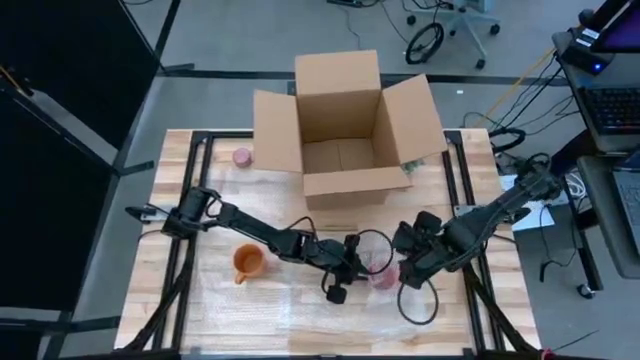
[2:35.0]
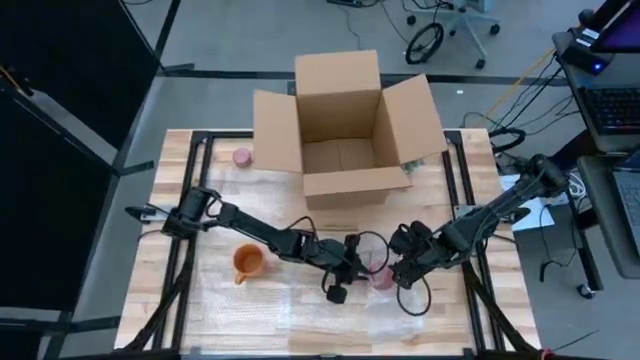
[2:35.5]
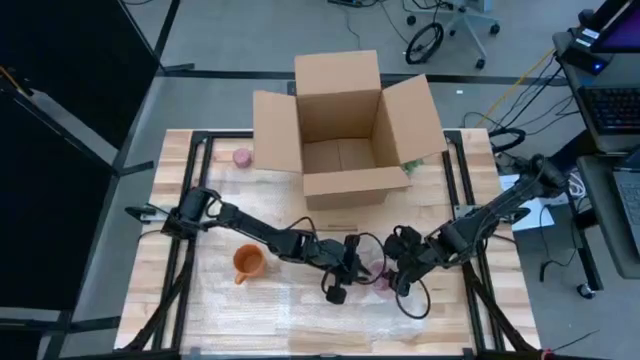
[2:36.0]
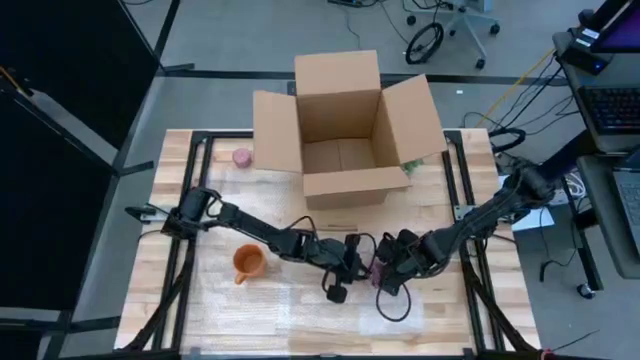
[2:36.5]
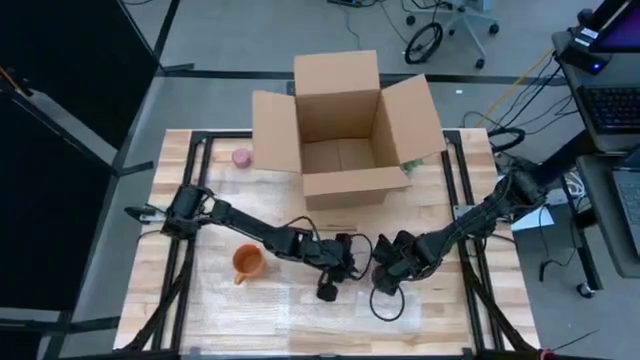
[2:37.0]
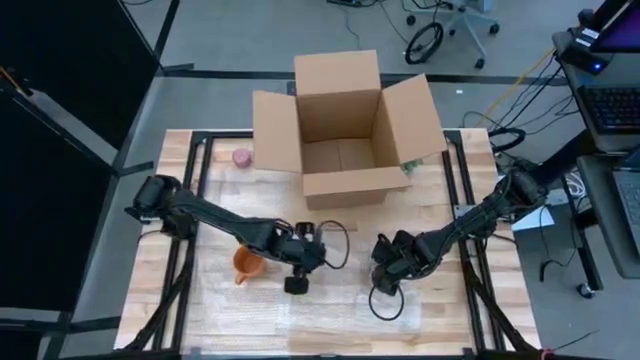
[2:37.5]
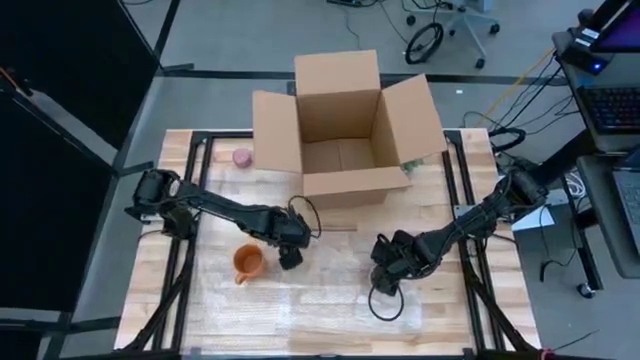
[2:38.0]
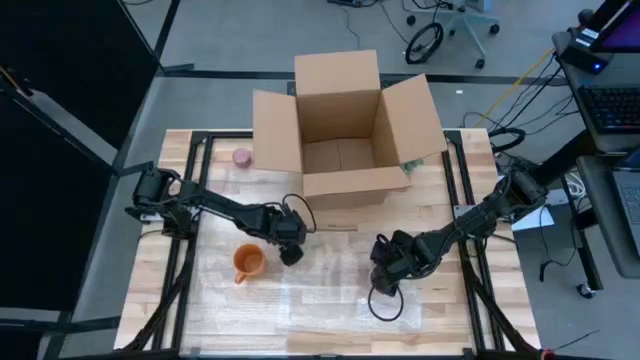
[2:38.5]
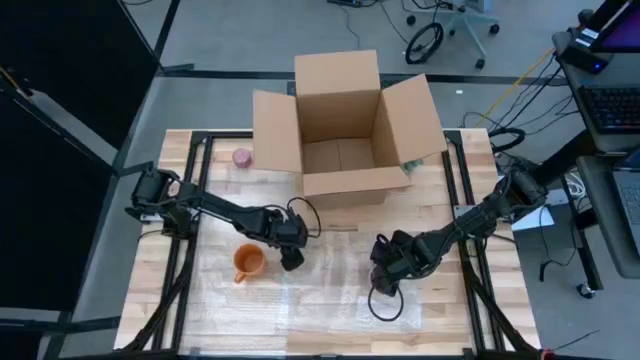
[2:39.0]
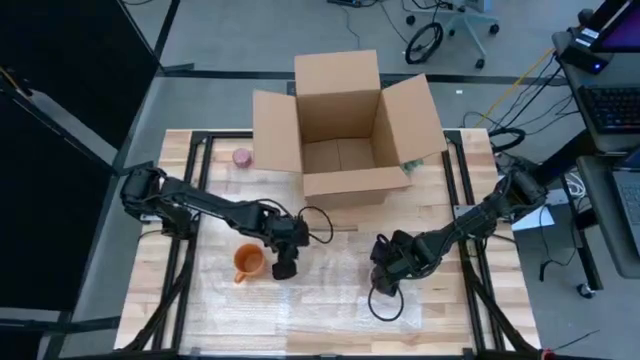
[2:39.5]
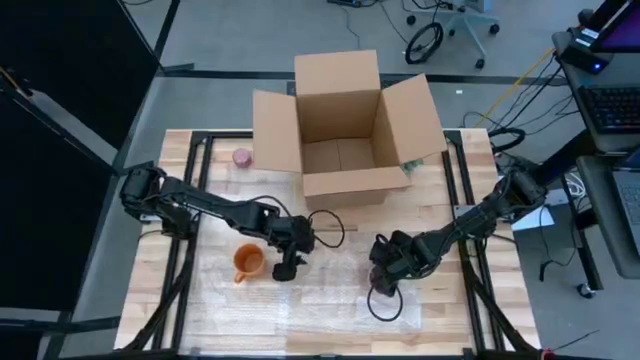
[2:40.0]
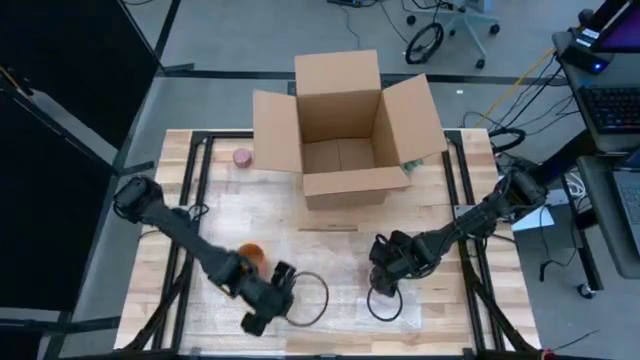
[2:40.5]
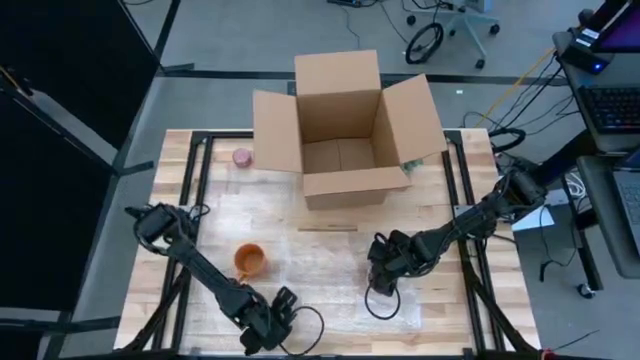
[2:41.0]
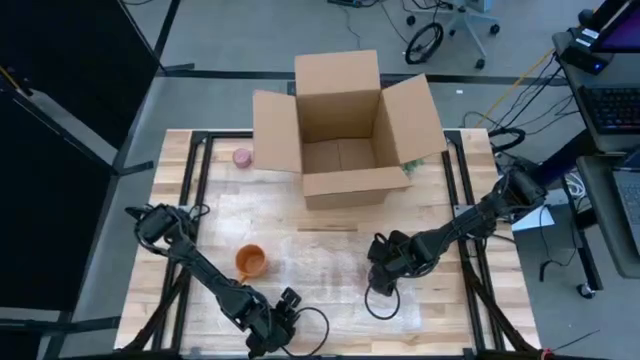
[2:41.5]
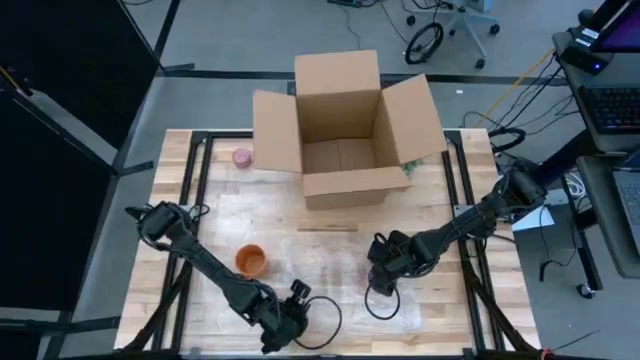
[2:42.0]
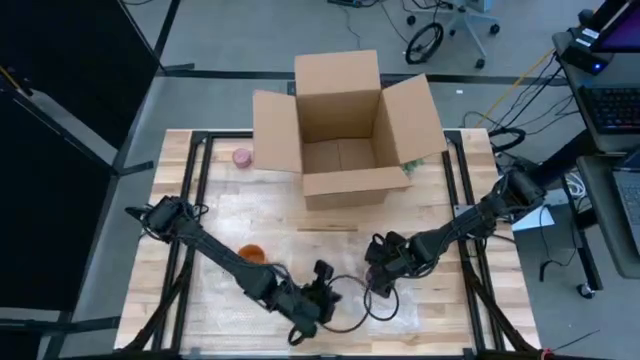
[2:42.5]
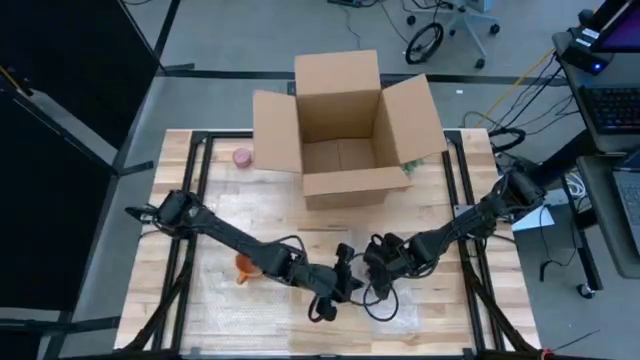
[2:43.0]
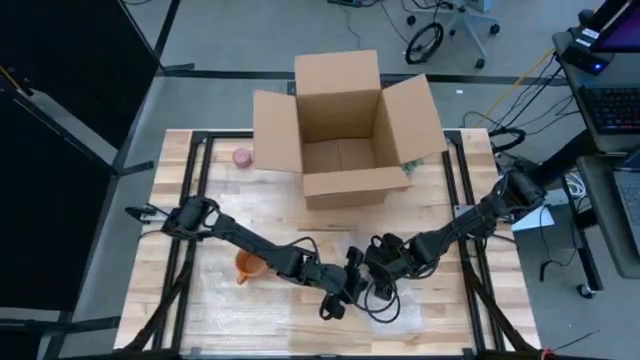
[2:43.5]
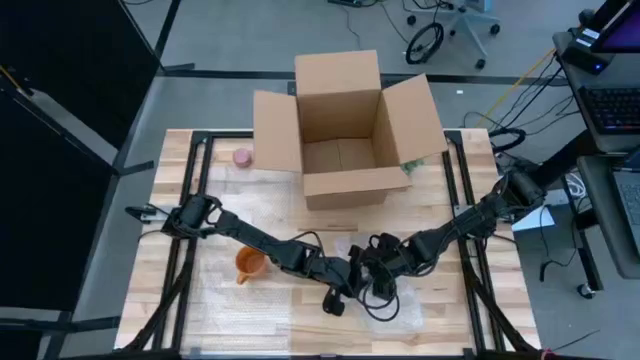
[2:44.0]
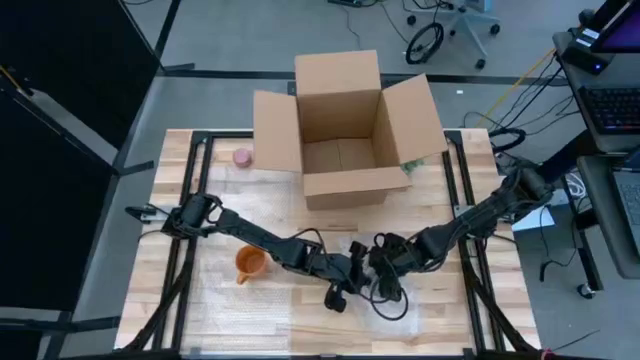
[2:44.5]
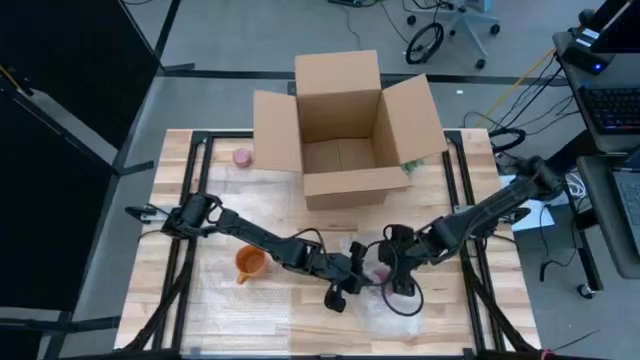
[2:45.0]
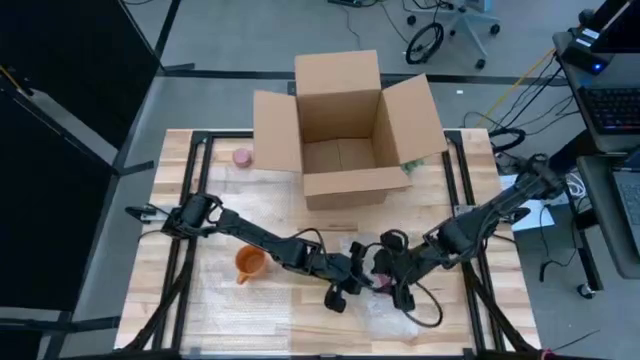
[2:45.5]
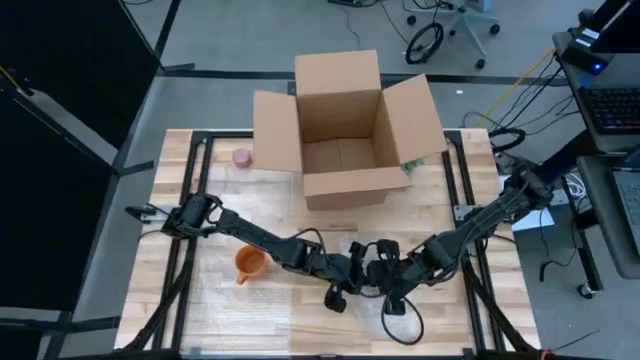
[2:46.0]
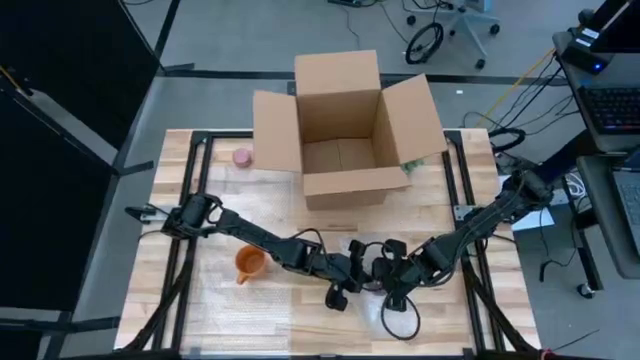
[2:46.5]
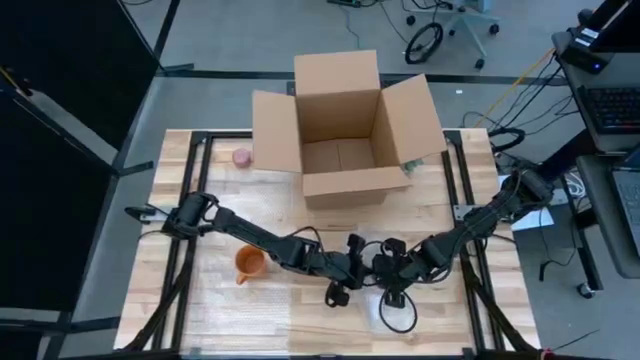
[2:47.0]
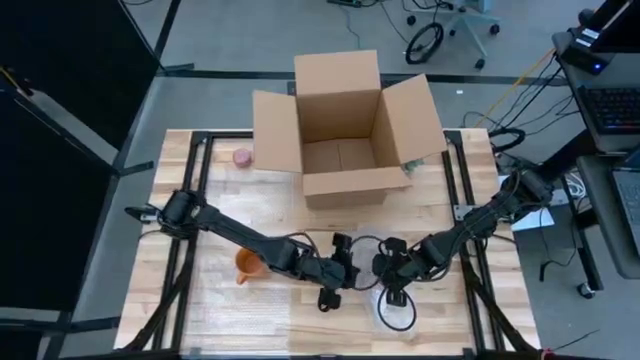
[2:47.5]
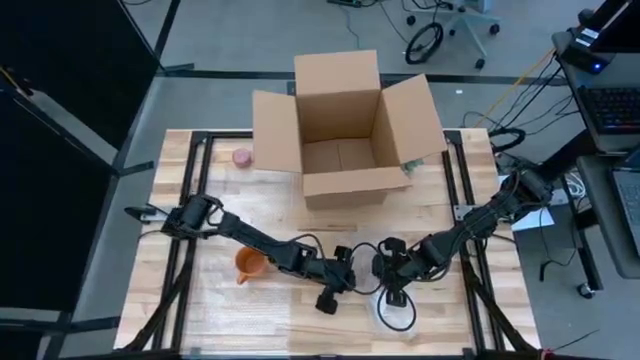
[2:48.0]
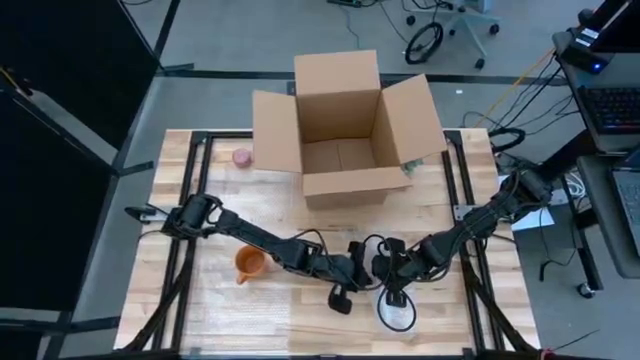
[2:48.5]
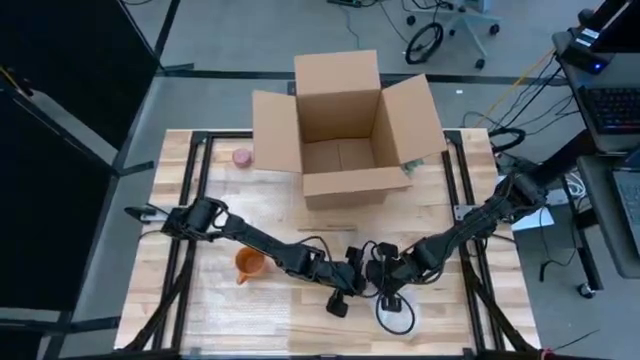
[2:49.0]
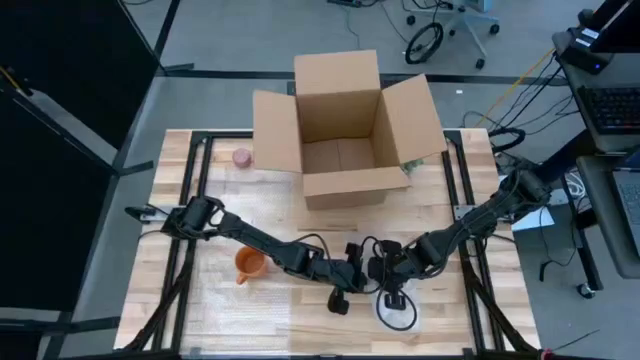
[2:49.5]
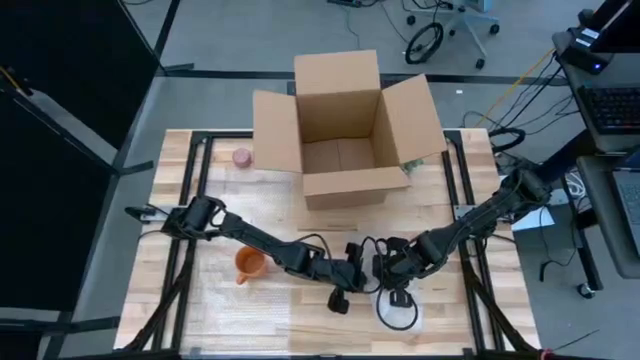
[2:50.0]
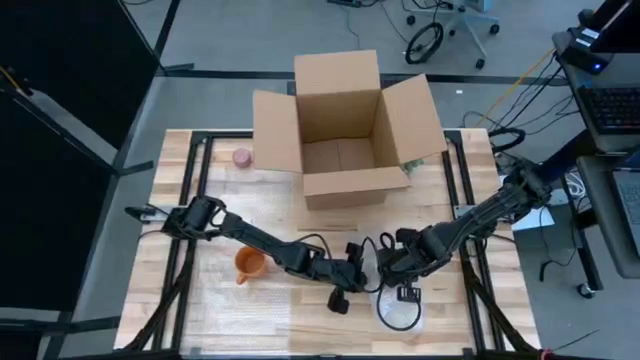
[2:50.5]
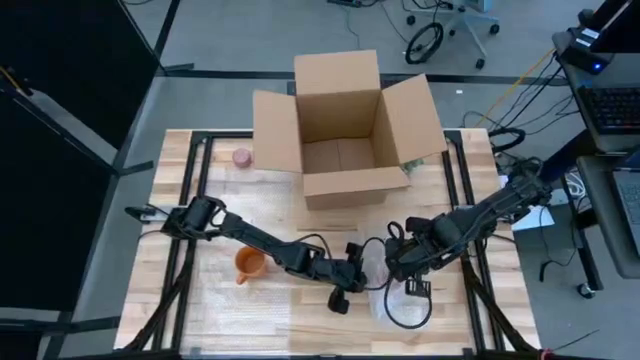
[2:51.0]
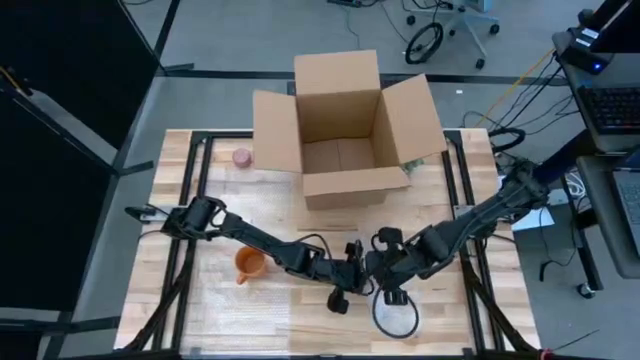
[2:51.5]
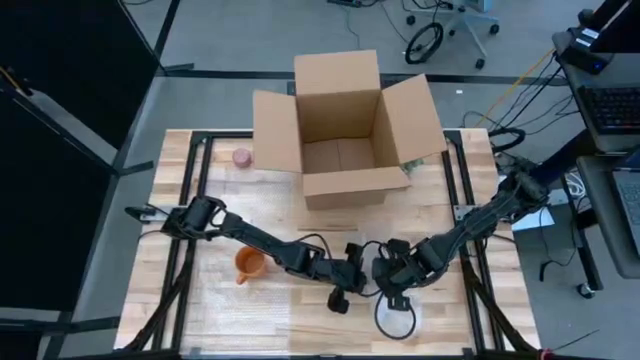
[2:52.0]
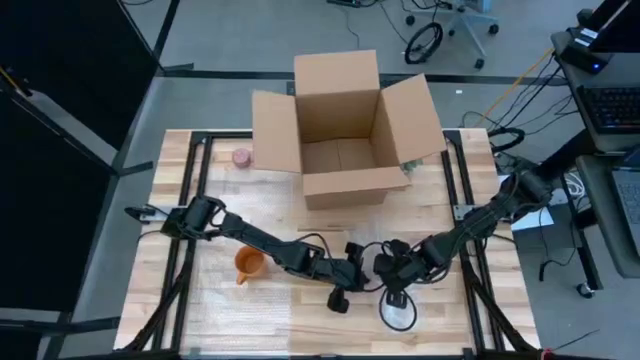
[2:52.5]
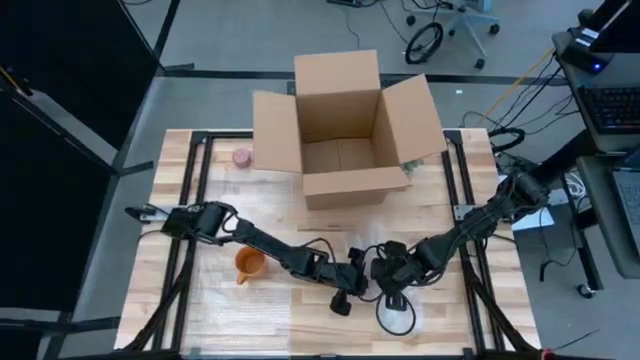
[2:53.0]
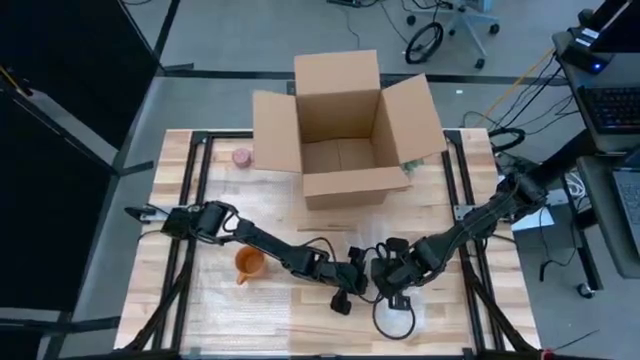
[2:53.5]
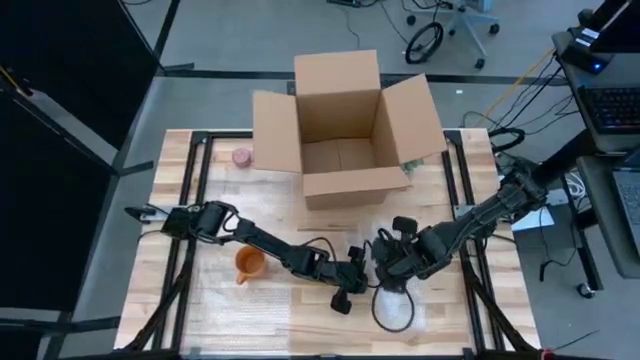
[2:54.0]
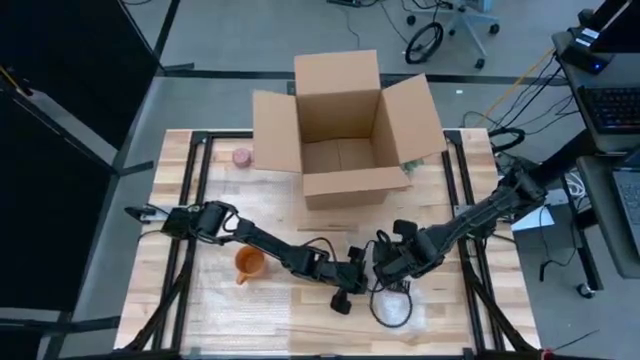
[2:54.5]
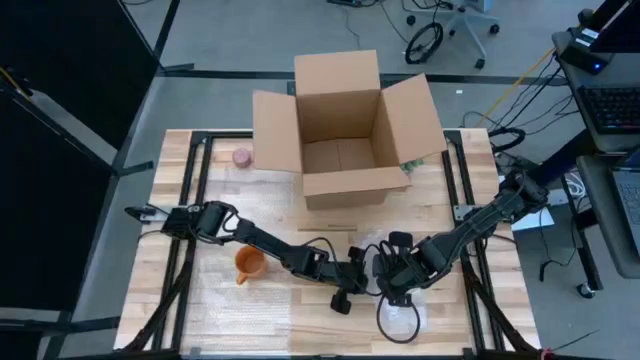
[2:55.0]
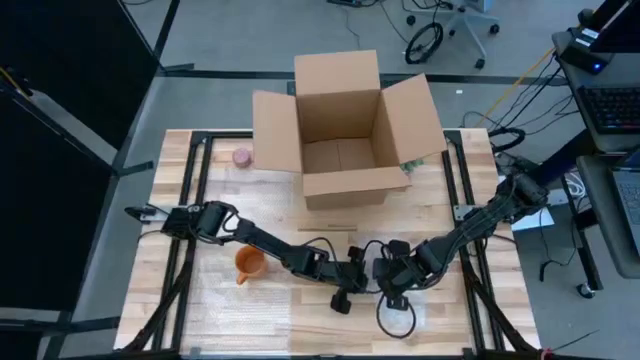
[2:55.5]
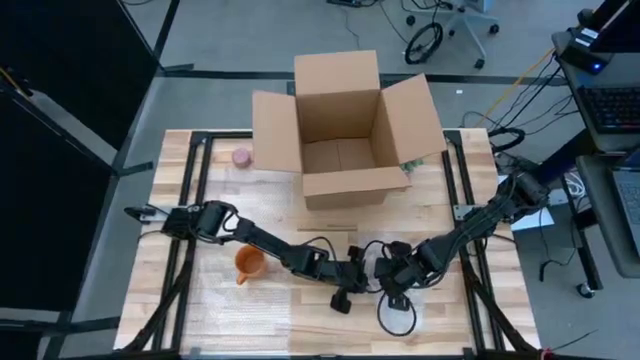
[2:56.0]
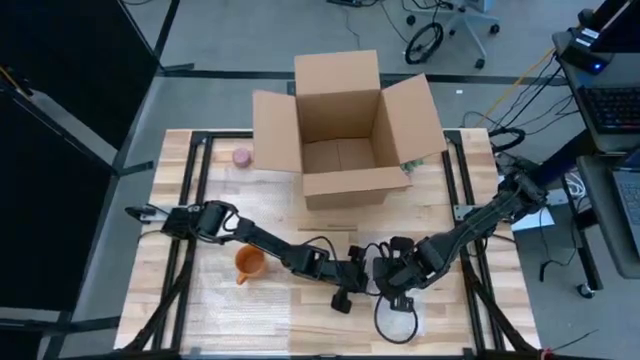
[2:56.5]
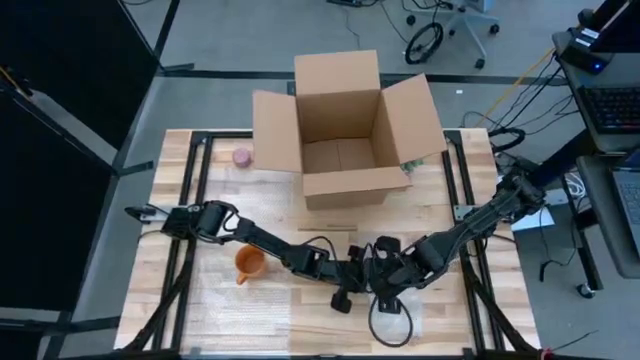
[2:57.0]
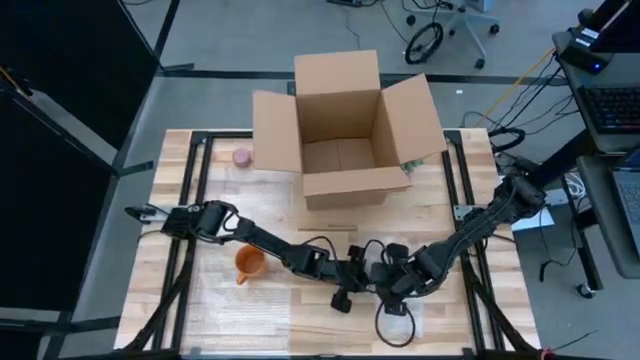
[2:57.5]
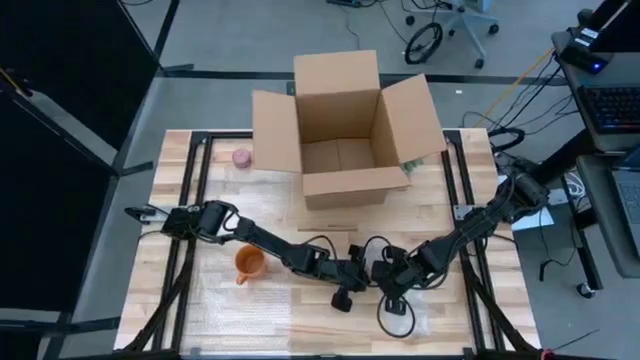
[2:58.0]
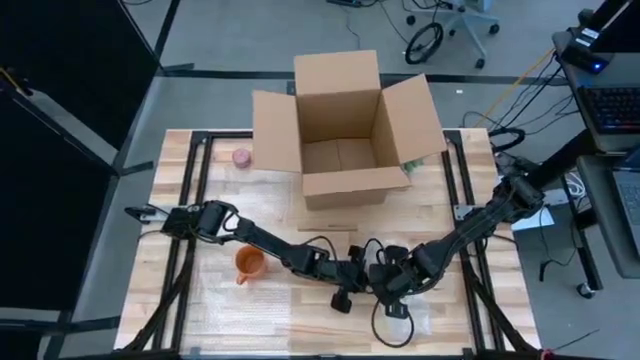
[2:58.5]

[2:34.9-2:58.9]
Task: wrap mug
Wrap the pink cup with the bubble wrap
